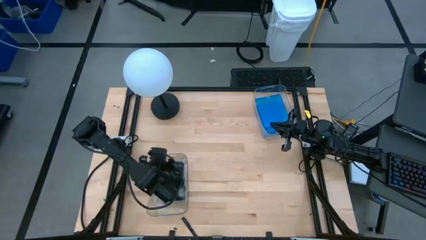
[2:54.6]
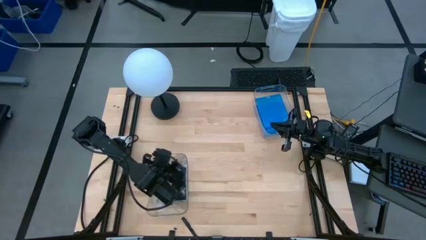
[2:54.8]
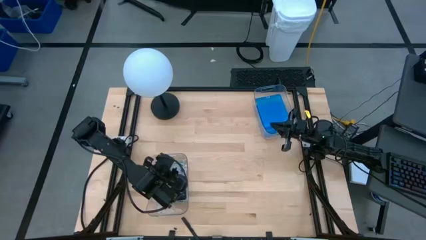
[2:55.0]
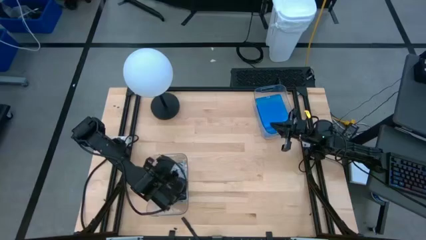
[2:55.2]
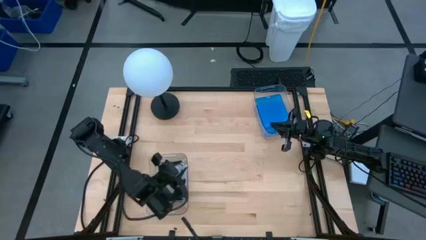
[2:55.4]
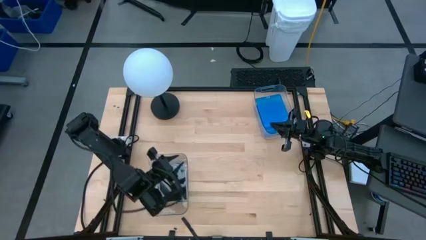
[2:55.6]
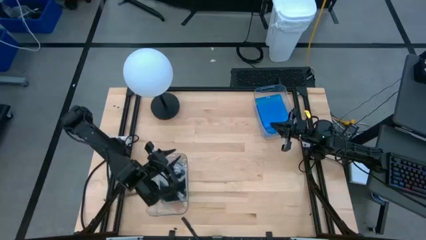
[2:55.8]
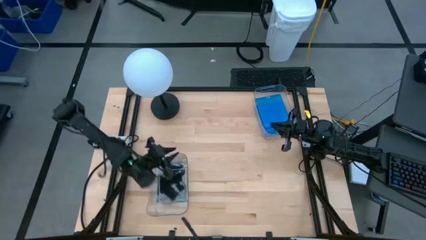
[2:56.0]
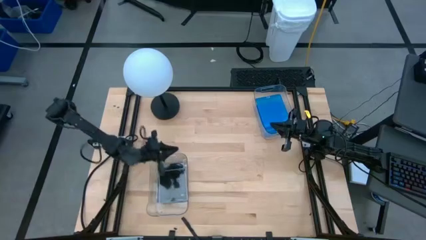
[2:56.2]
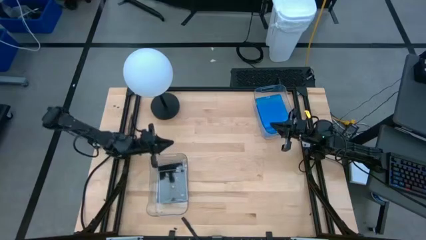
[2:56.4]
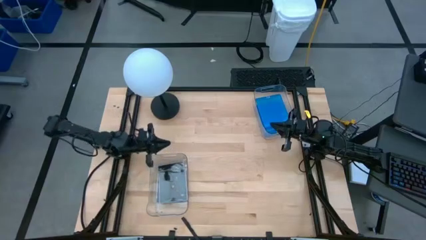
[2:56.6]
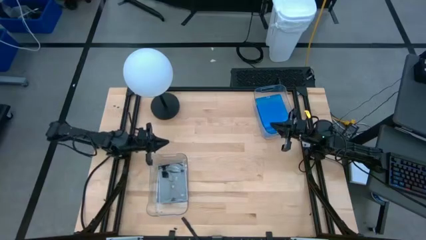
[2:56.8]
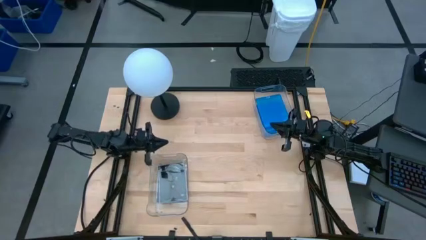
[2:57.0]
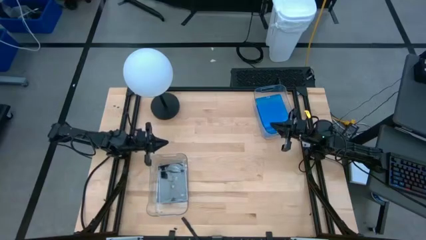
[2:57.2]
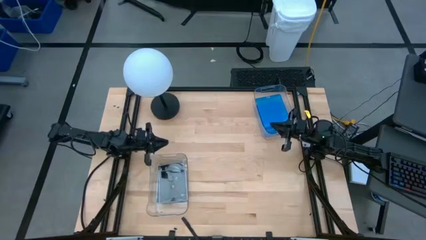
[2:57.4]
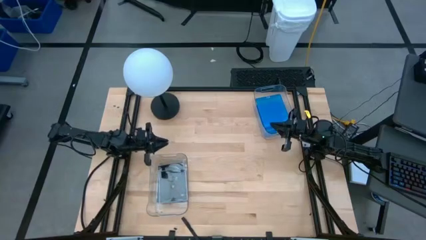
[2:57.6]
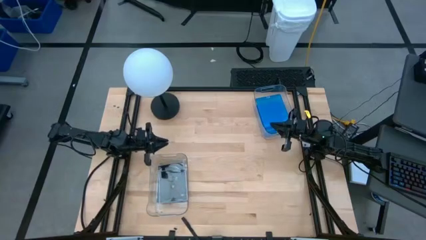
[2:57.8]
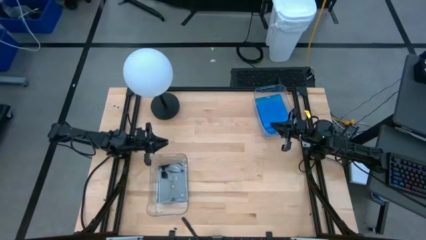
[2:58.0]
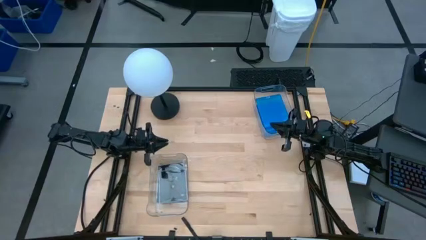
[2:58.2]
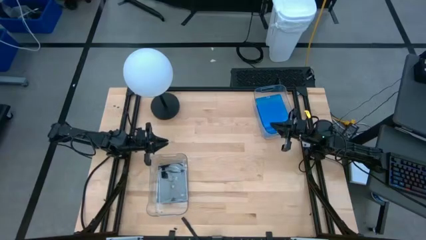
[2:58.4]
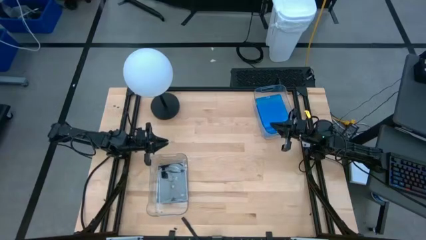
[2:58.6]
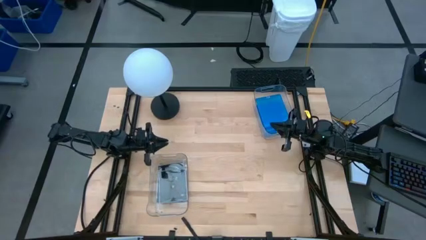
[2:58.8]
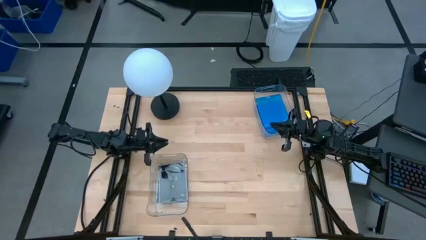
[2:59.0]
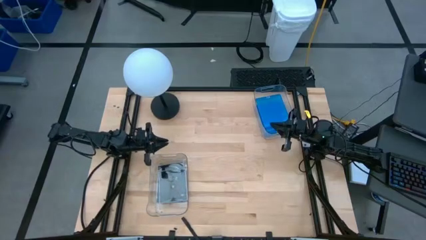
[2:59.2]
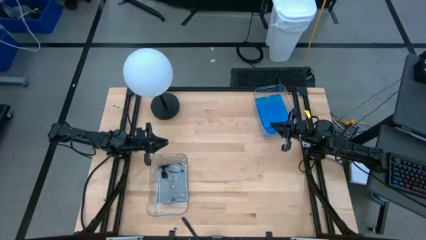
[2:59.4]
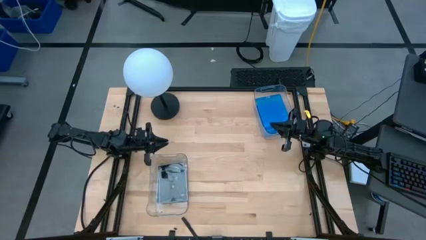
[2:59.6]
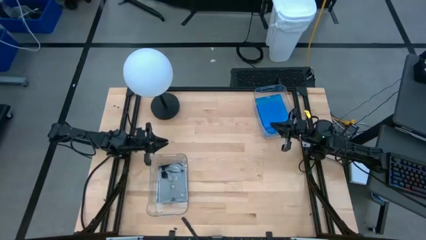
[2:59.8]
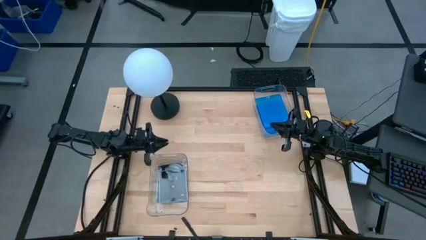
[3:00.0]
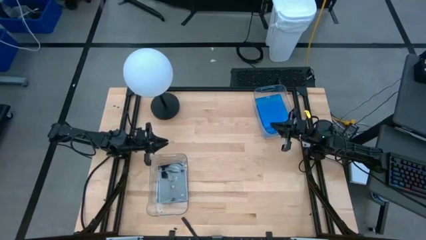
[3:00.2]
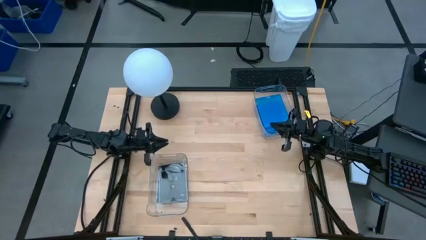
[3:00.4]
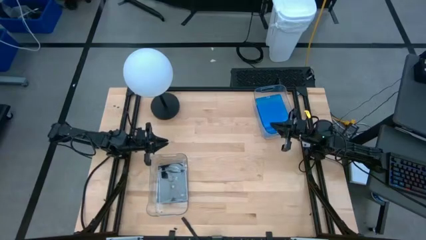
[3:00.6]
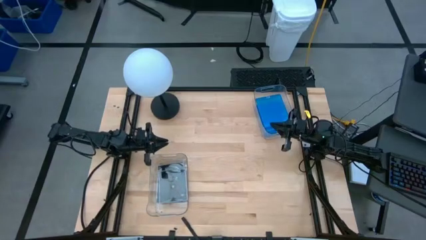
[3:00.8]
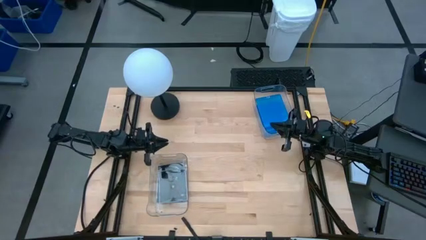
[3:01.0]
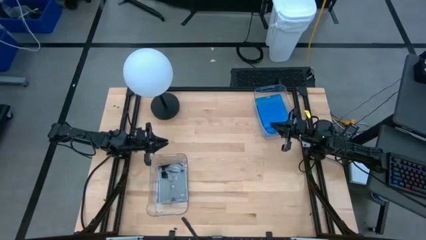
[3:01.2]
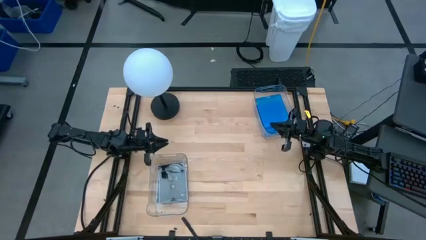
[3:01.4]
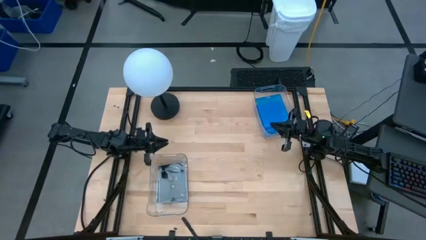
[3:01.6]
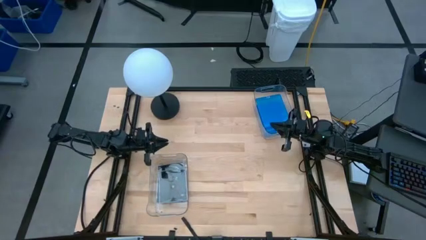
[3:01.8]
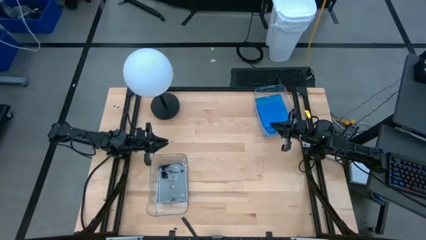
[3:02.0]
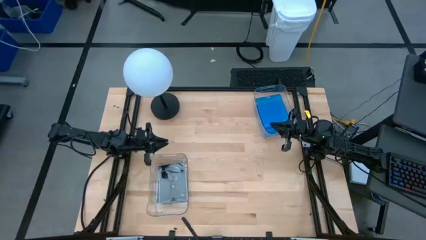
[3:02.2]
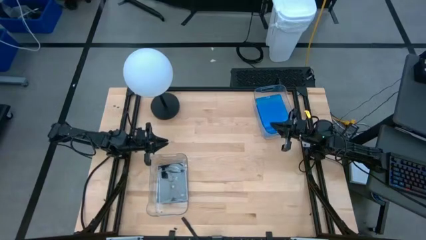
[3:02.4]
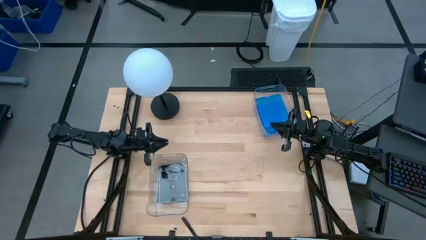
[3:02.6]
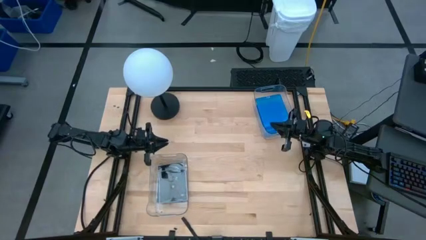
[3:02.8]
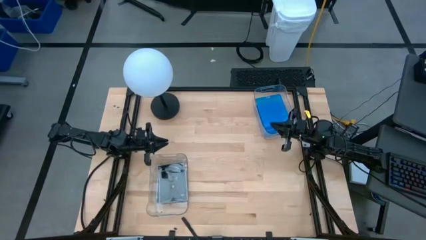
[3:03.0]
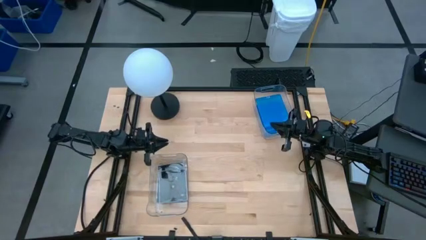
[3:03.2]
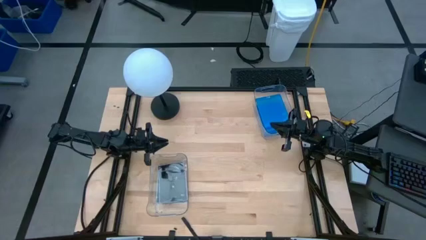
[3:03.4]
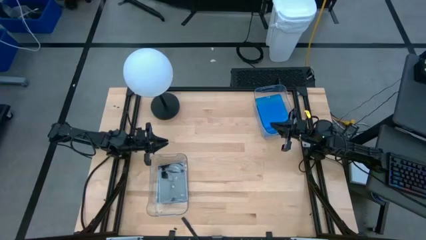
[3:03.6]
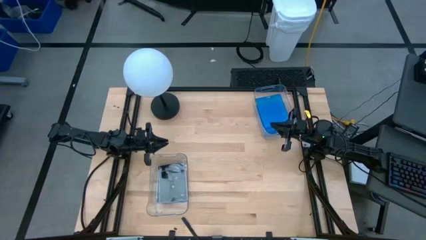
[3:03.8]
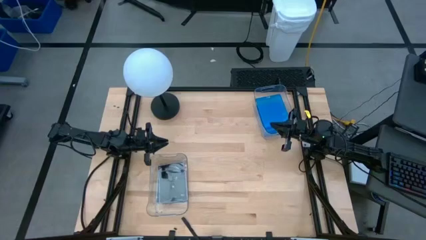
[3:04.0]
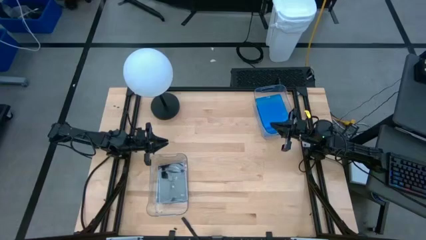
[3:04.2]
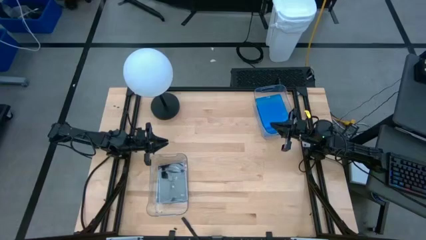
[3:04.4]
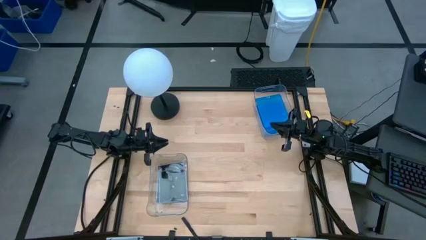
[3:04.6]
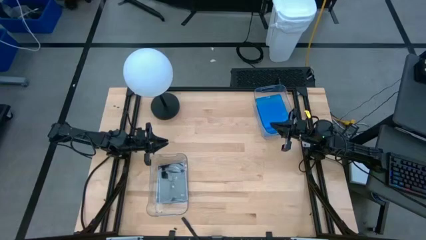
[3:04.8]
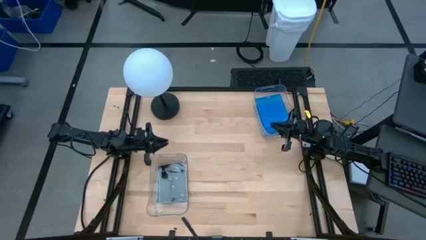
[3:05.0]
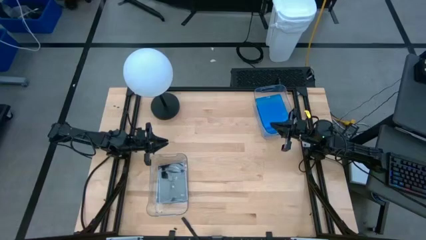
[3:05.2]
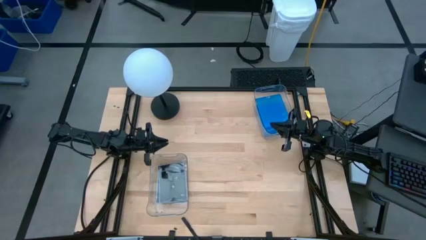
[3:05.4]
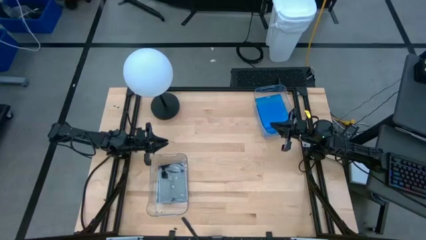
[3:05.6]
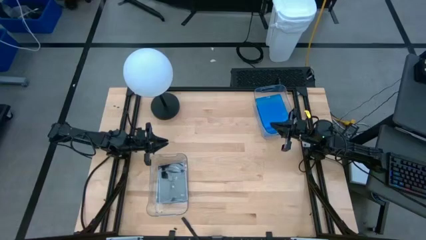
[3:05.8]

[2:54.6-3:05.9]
Task: Pick & place jewel cases by type
Return to Home Position

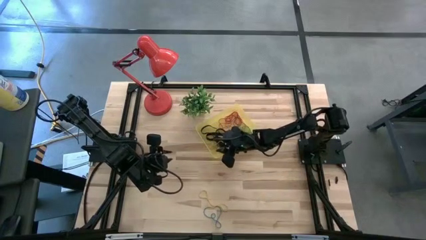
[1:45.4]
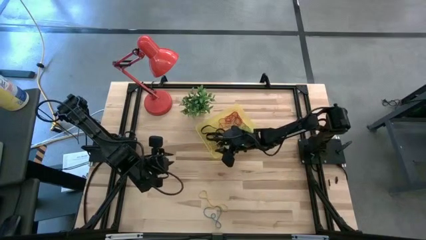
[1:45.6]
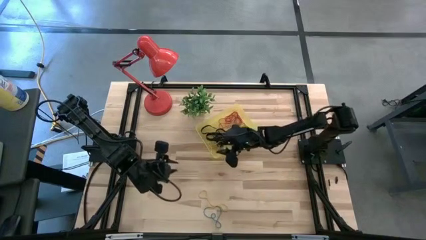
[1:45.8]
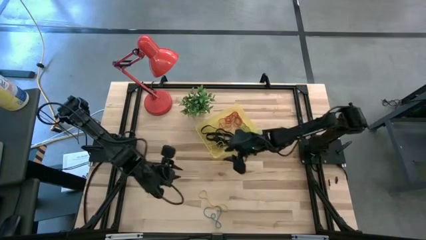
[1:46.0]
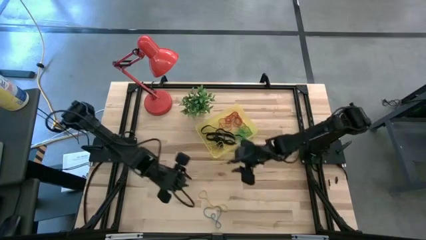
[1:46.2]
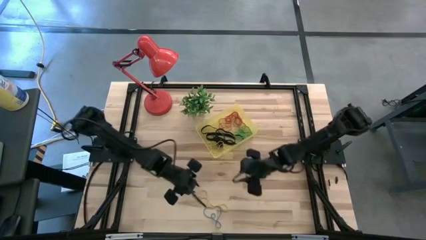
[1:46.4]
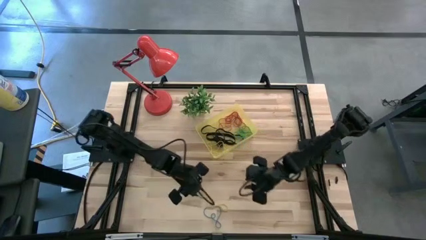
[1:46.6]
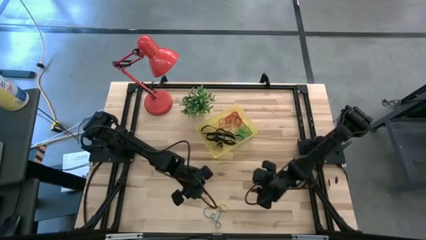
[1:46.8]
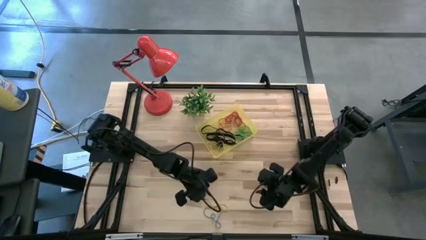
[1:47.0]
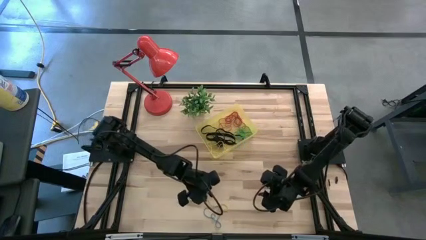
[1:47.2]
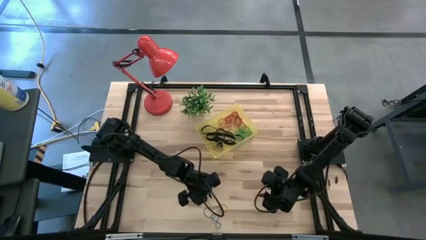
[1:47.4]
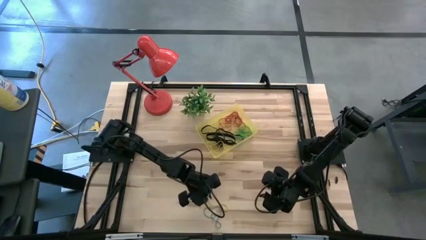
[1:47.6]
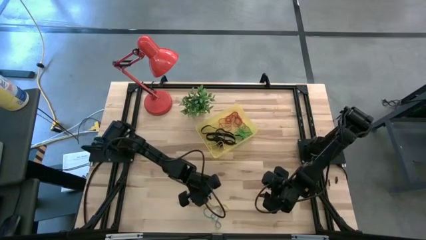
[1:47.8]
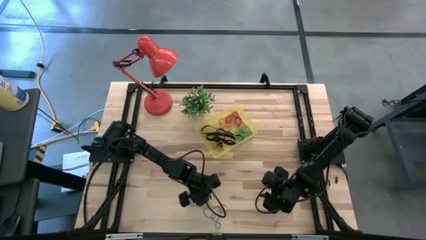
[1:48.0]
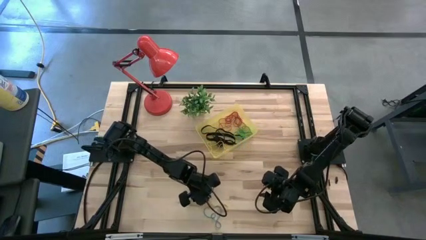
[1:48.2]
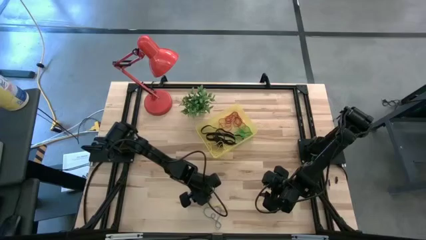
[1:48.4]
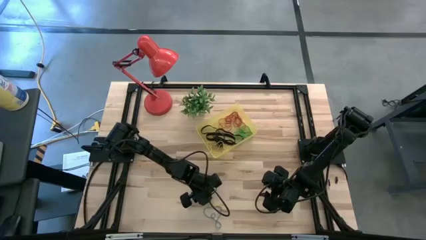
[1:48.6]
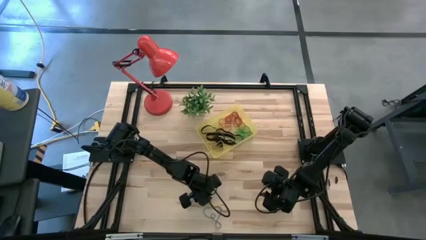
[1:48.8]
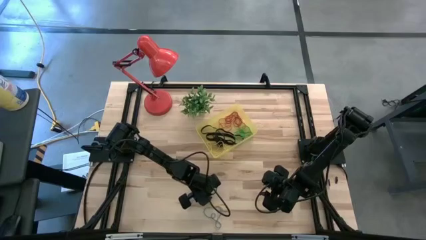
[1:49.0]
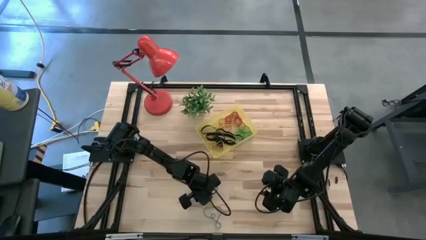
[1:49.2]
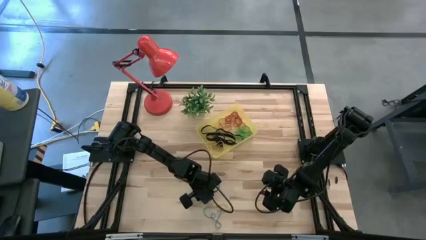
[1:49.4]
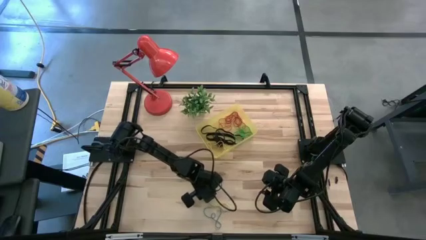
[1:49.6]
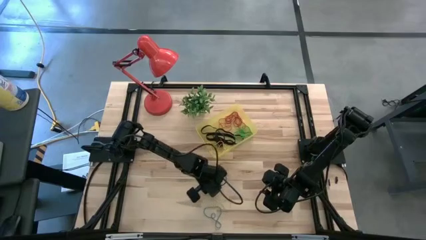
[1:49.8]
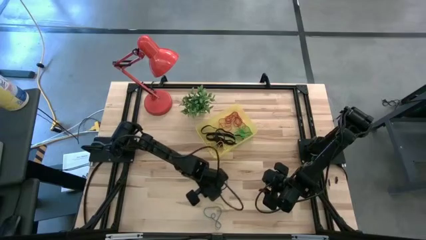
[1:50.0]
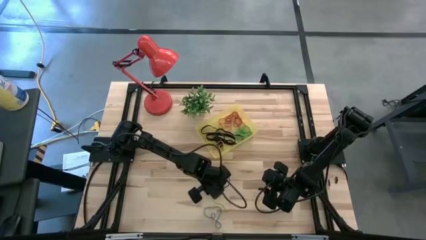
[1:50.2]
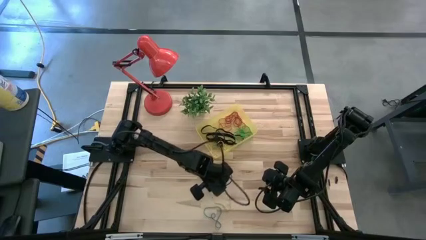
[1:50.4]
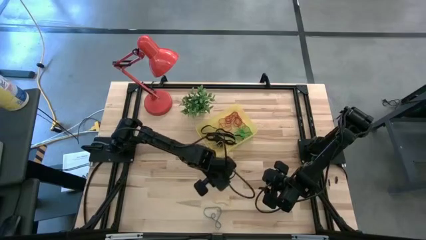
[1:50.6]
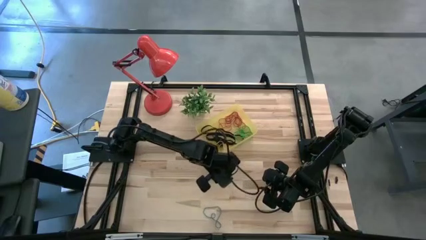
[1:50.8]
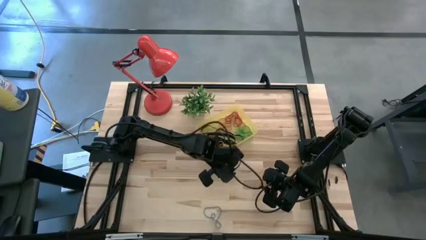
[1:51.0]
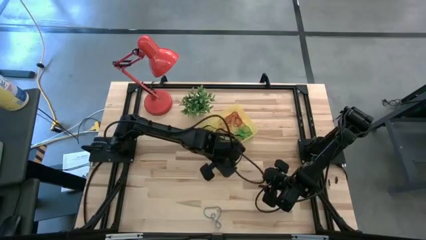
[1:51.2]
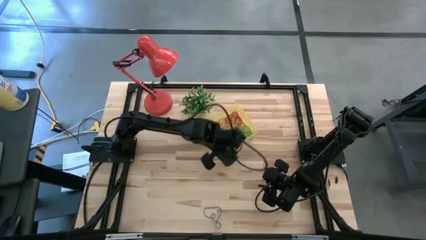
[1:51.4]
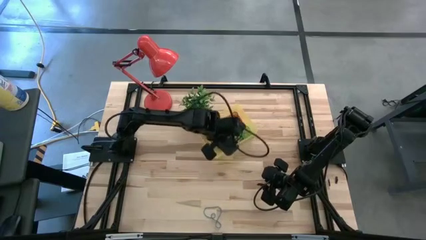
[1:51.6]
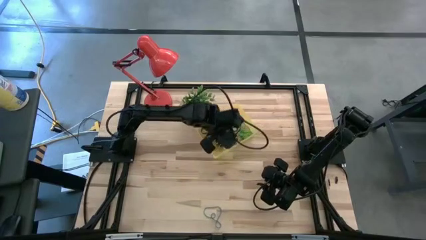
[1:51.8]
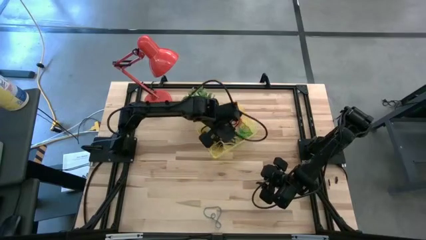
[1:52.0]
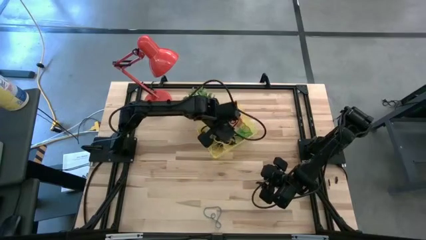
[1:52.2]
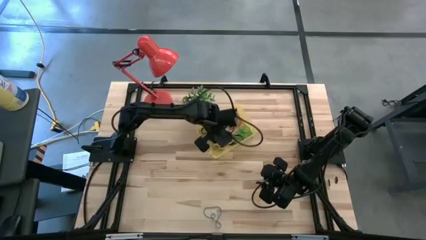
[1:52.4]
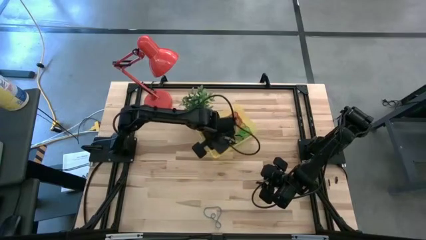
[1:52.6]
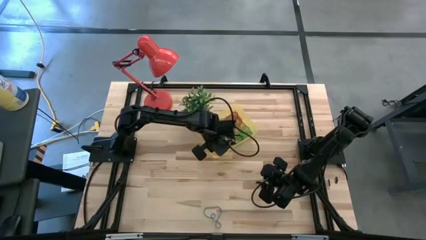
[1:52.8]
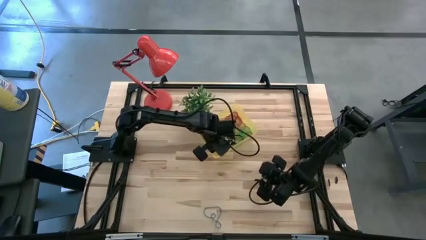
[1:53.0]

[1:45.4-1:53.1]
Task: Pick and place rubber bands into bin
Put the yellow rubber band into the transparent yellow bin
